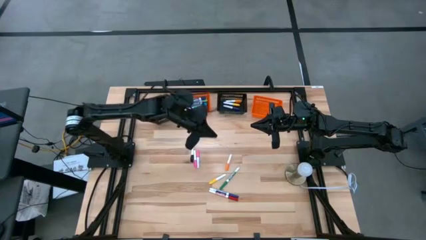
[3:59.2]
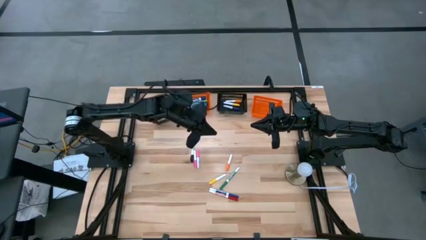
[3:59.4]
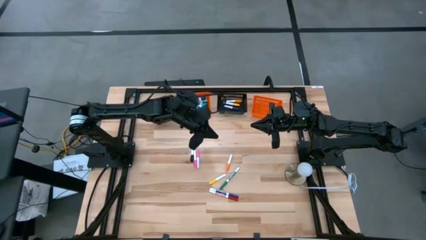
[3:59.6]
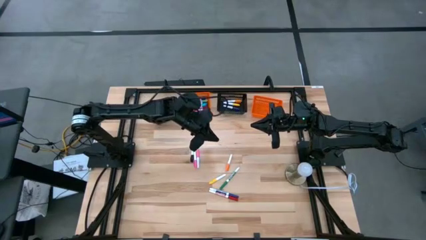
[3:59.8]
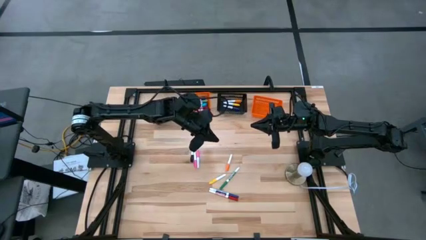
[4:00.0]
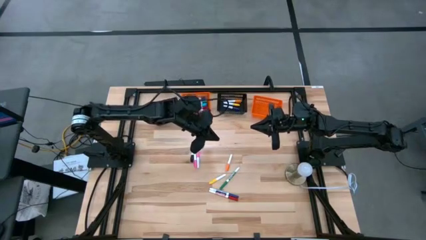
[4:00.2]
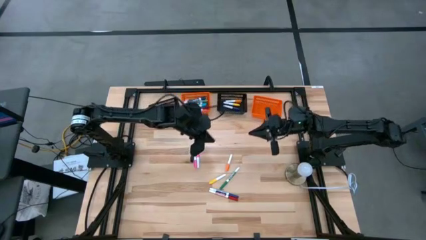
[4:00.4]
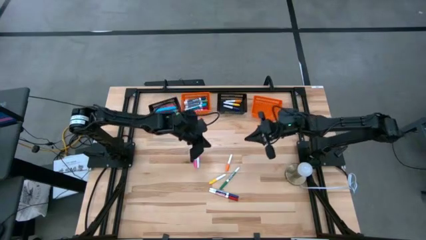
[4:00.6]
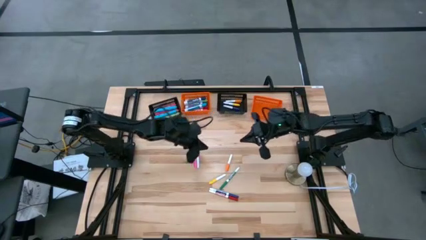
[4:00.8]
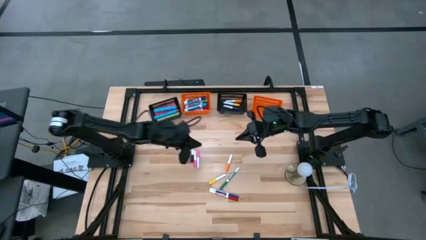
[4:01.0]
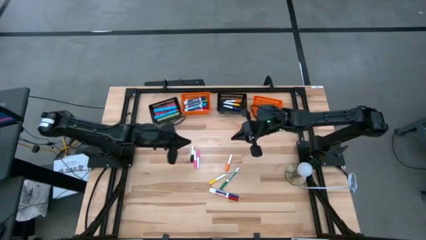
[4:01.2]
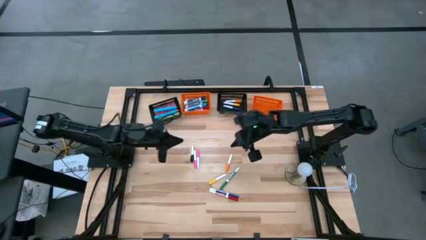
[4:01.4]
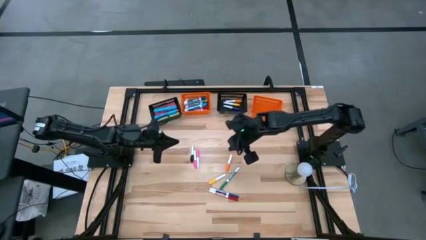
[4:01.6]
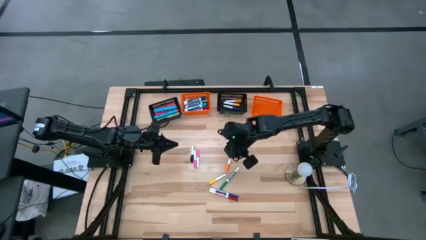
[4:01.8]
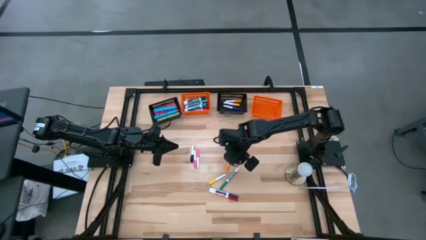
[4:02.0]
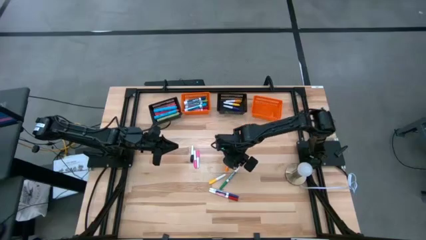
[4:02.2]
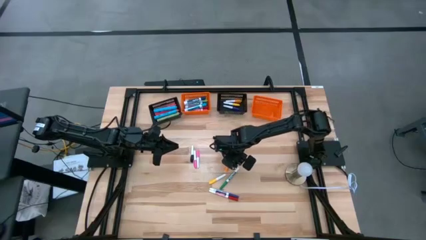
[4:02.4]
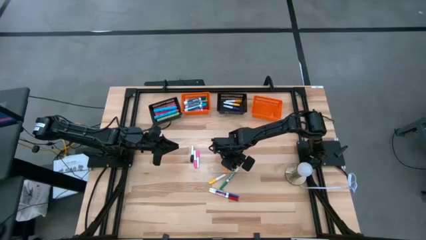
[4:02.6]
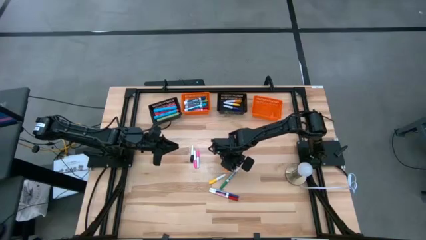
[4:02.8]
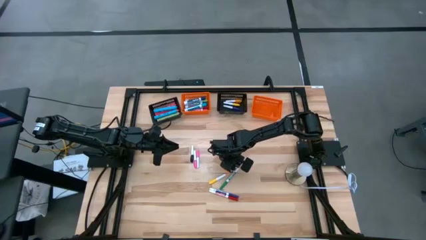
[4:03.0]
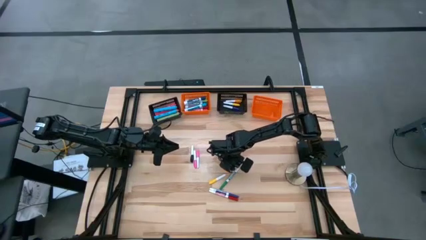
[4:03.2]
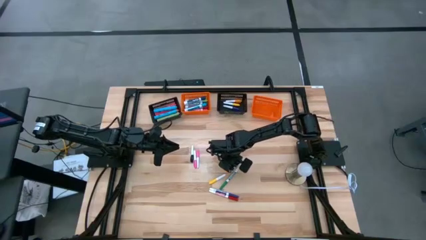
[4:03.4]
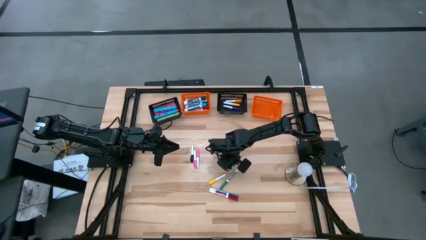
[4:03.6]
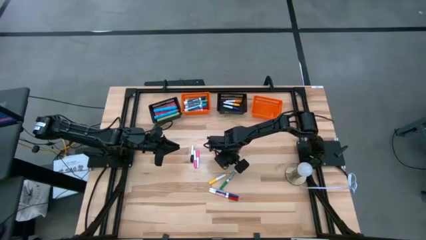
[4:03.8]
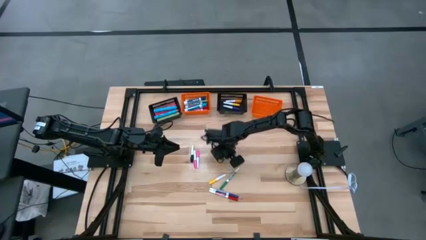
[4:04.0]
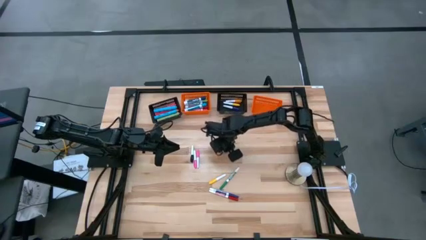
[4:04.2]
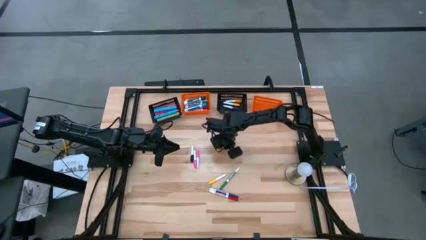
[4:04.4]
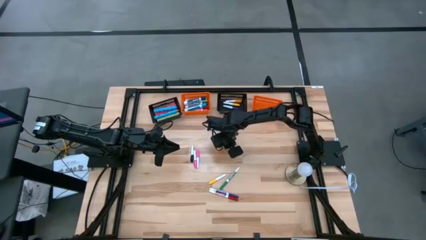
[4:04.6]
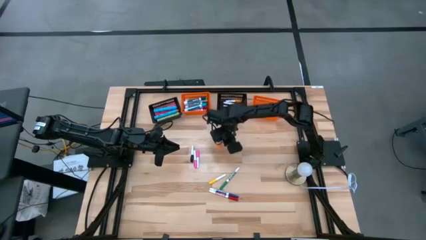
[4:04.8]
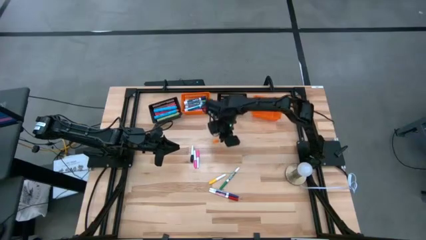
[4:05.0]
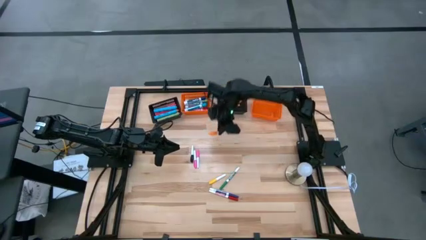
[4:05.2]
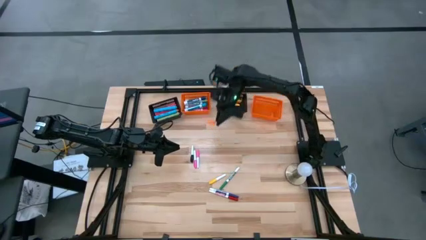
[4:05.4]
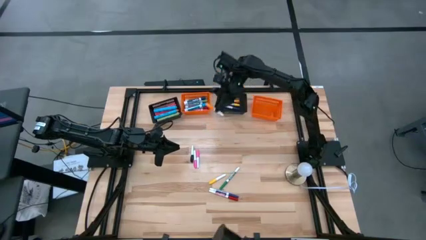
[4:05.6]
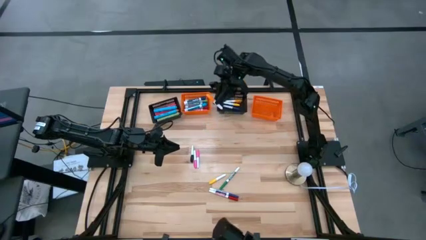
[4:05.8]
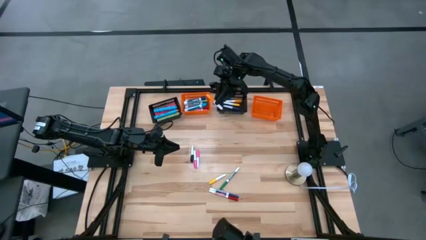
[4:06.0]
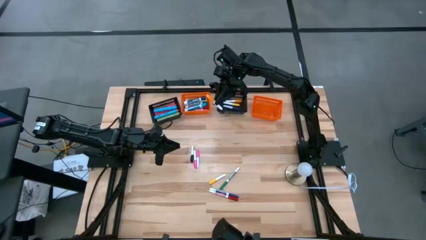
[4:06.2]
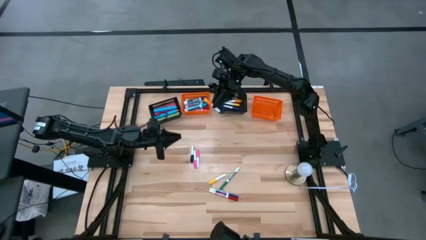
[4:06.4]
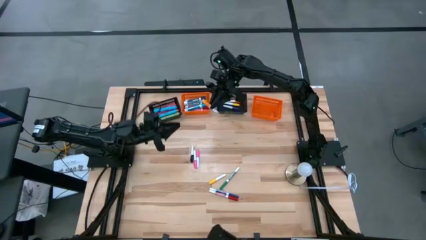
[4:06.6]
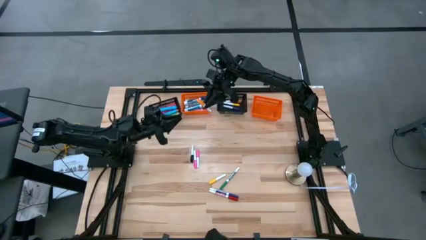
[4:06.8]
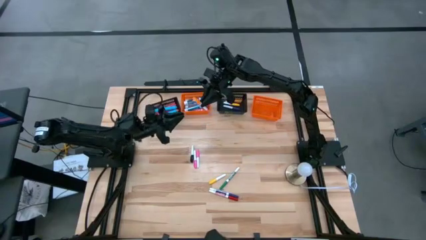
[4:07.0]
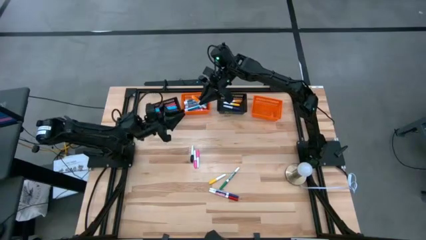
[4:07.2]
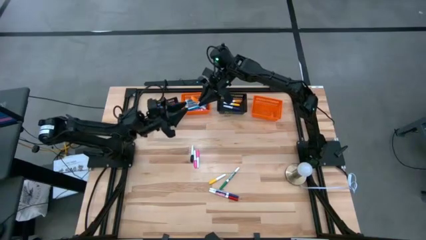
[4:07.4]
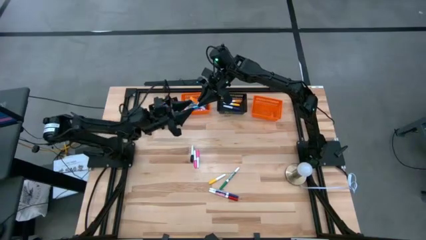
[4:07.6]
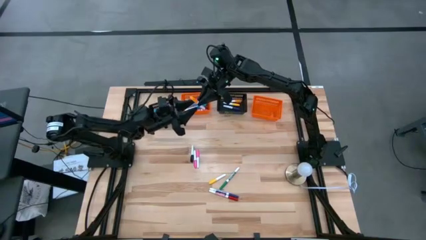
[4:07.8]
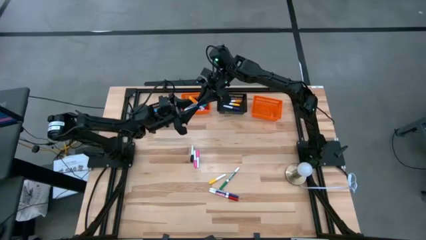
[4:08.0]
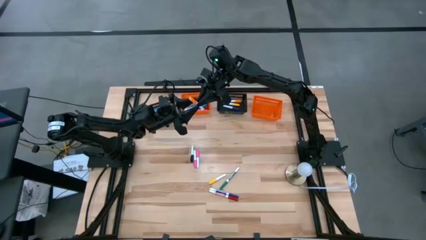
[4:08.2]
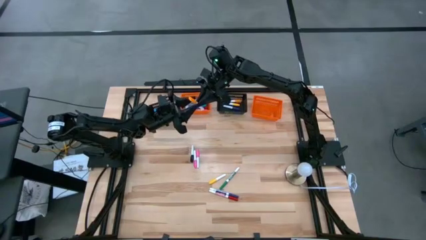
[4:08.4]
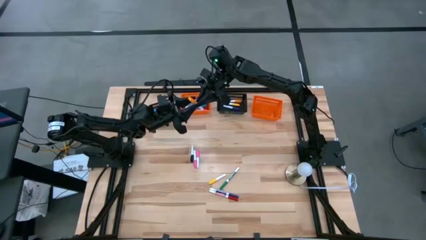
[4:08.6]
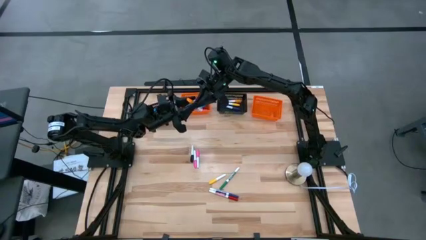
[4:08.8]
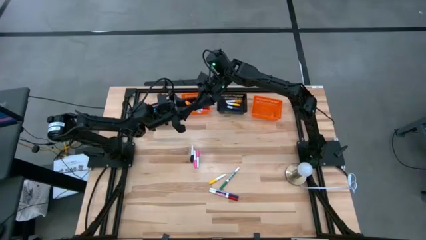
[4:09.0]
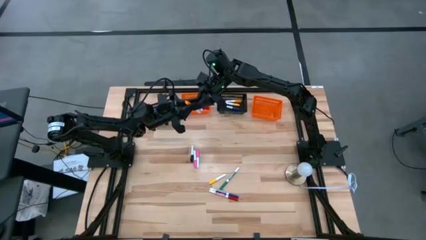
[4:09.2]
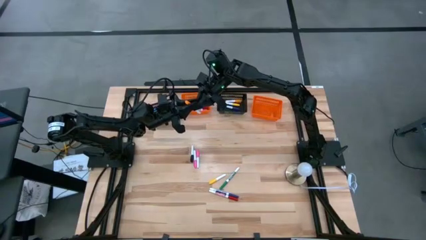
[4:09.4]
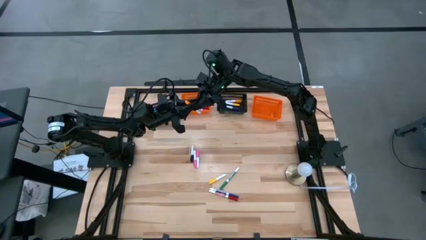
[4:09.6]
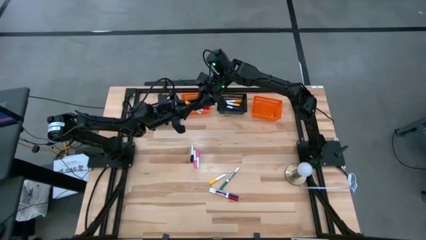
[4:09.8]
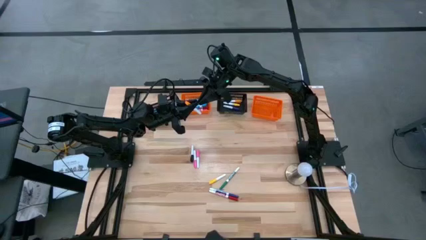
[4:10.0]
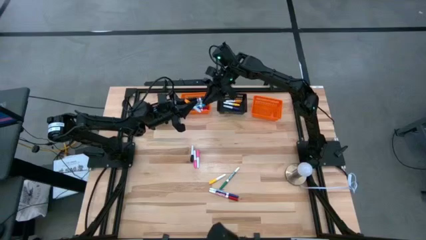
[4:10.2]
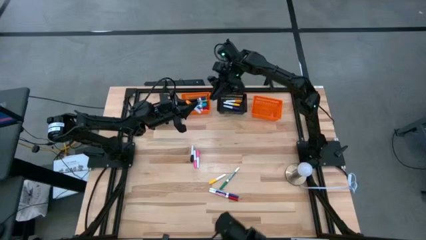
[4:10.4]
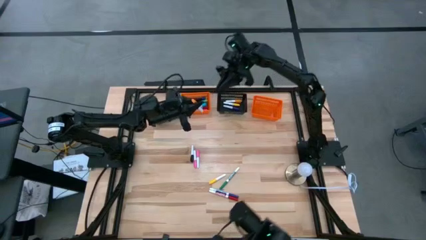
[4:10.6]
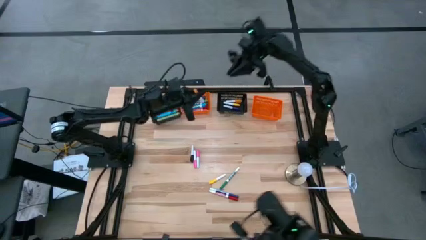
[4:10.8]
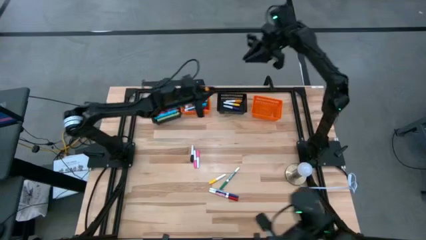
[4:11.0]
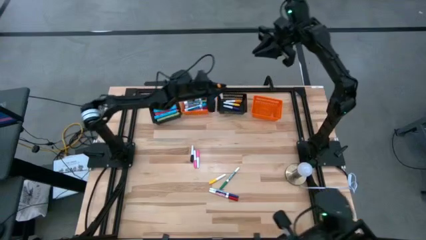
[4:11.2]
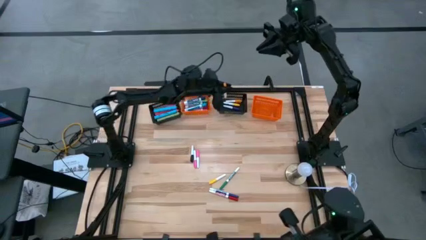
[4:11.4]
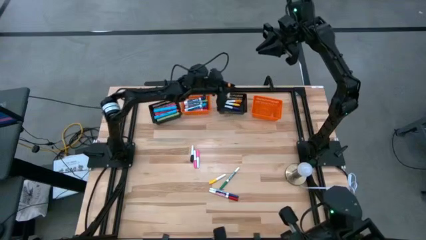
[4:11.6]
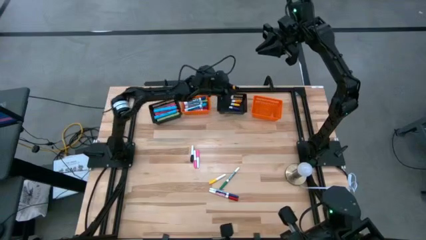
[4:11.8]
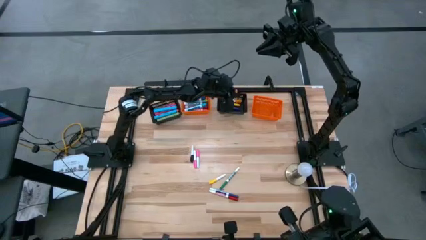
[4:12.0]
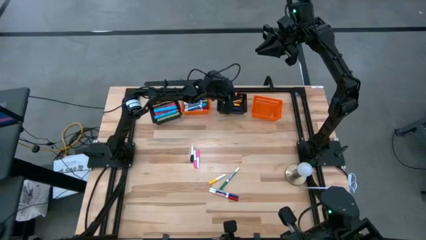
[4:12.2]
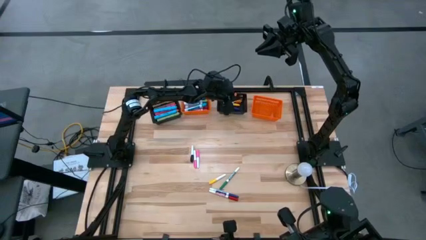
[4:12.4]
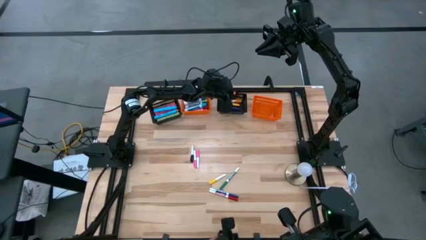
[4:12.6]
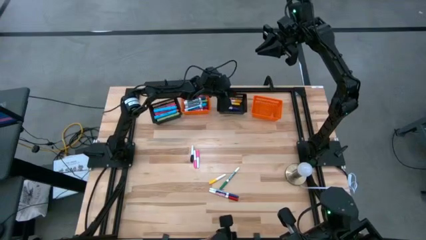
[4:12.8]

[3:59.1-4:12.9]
Task: Pick & Place Markers
Put the orange mini highlighter into the right black bin

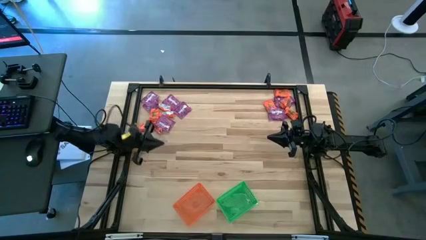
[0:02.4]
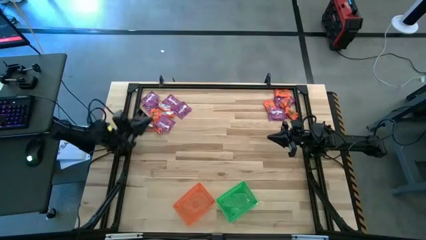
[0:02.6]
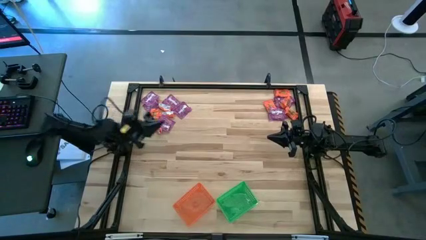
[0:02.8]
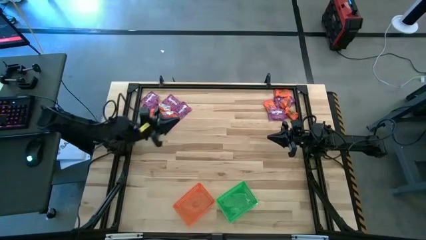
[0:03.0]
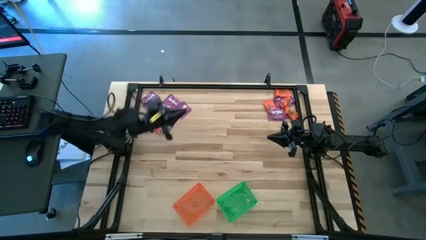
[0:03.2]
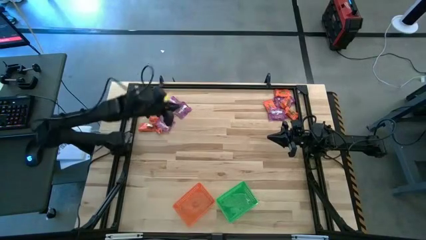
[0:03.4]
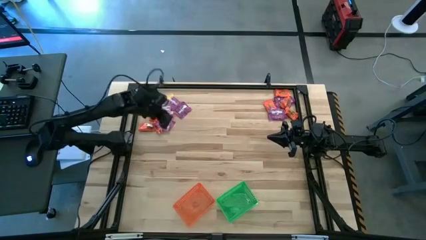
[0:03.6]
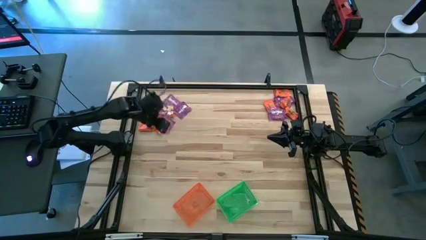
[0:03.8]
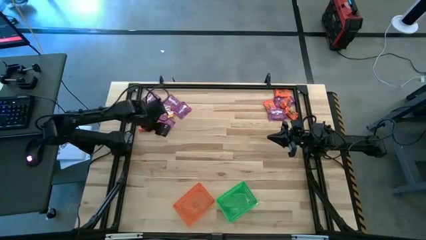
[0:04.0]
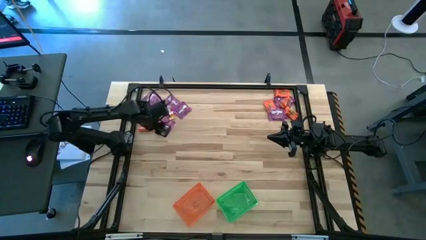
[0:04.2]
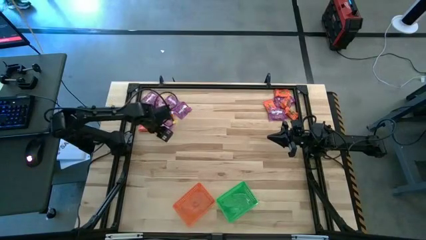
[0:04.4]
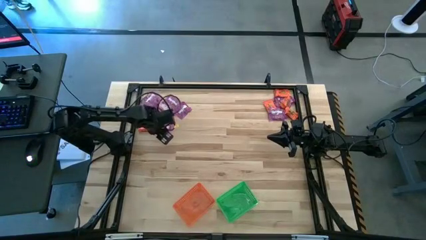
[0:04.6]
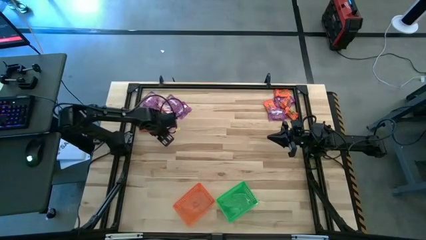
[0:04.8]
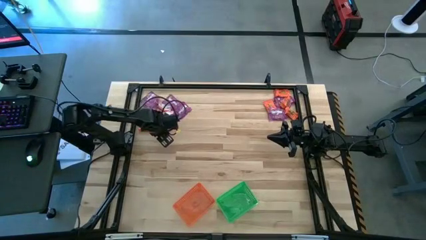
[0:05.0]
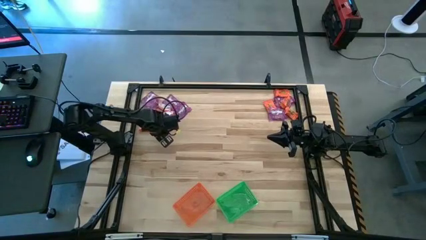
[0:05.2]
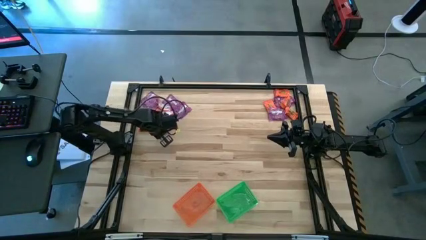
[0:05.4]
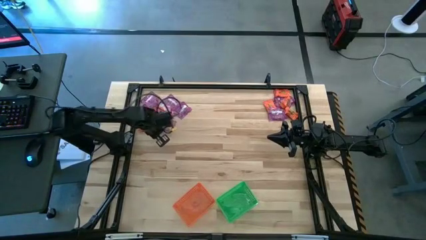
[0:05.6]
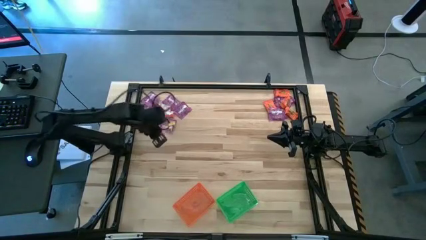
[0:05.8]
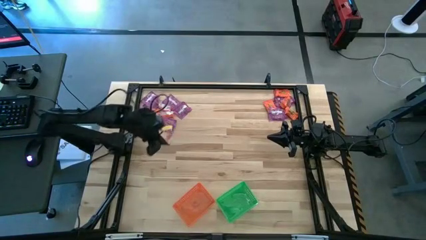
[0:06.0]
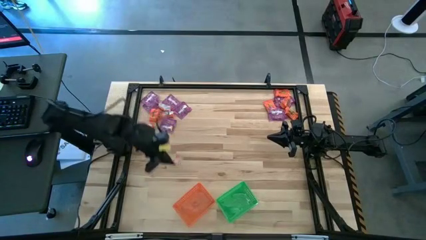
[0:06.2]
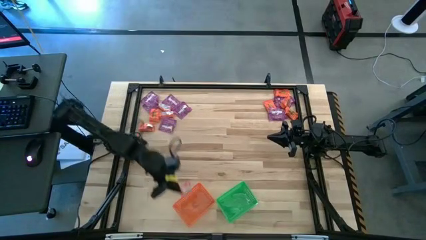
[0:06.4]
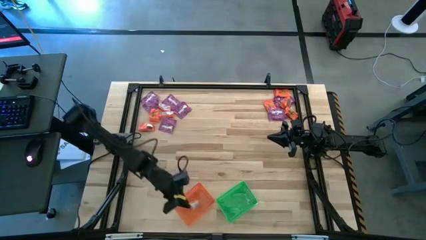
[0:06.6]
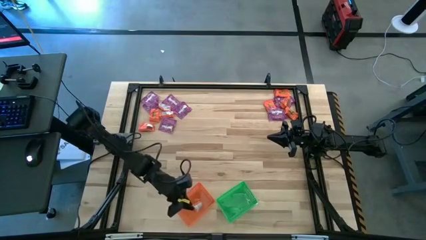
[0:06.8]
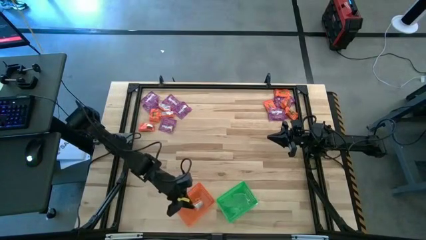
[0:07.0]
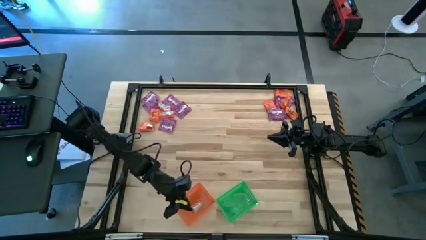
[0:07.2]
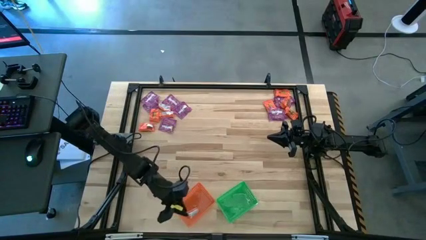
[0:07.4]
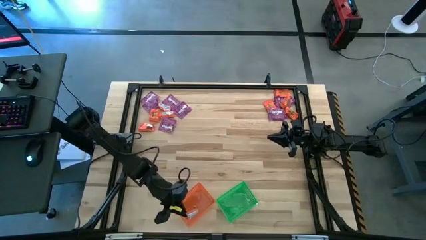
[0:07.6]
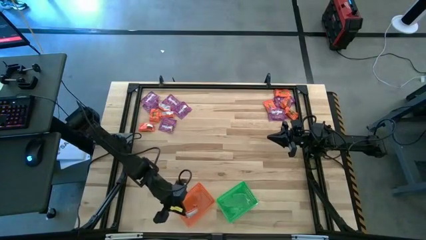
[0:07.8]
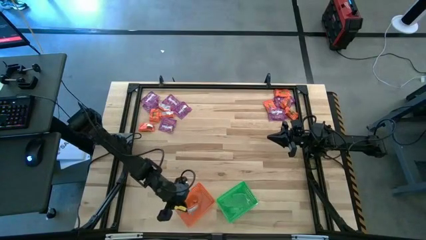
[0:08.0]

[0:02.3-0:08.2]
Task: Sort candy by brand, put in halloween buckets
Put the orange candy into the orange basket
